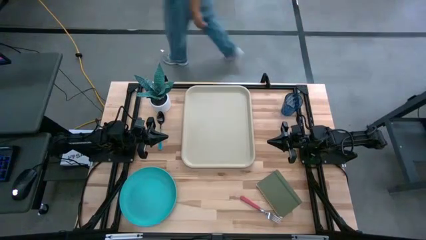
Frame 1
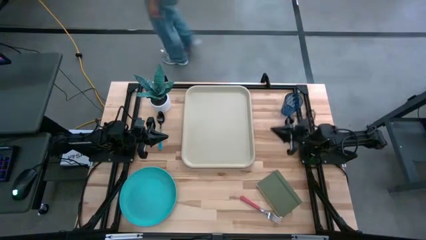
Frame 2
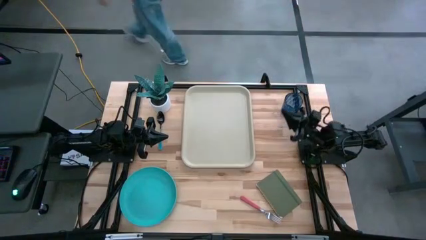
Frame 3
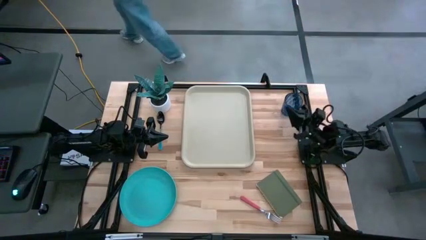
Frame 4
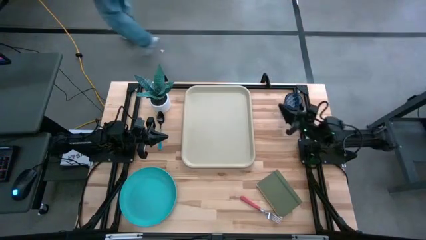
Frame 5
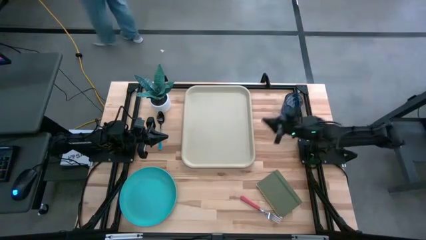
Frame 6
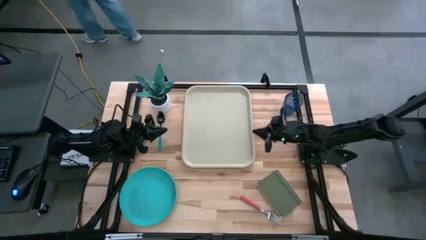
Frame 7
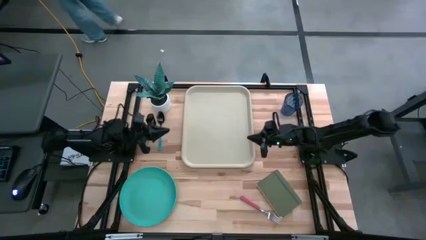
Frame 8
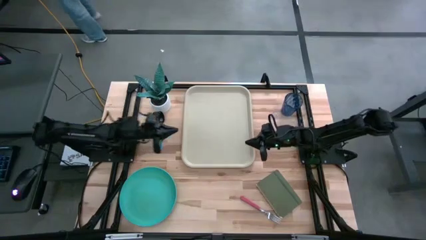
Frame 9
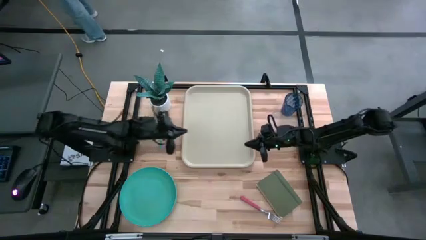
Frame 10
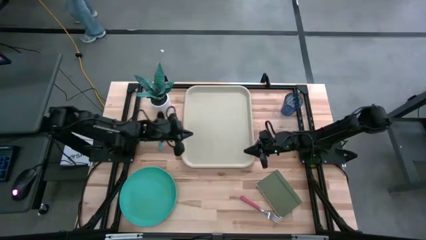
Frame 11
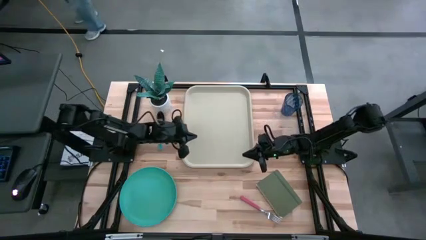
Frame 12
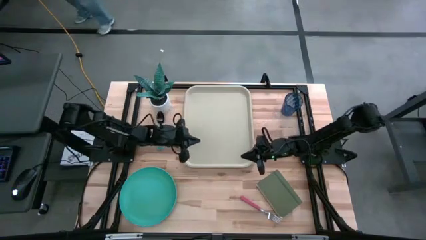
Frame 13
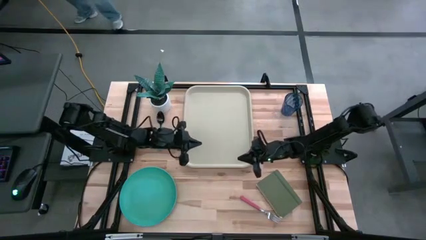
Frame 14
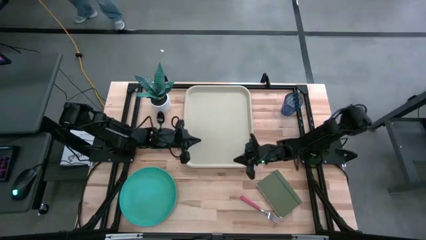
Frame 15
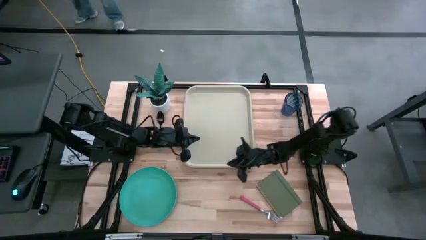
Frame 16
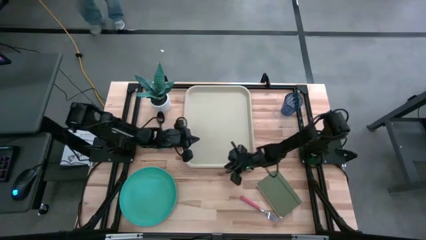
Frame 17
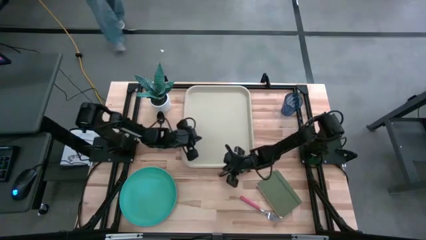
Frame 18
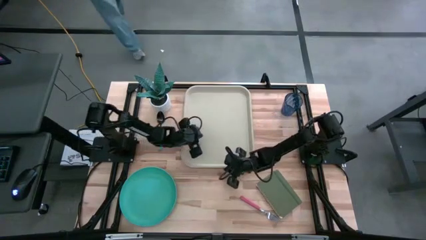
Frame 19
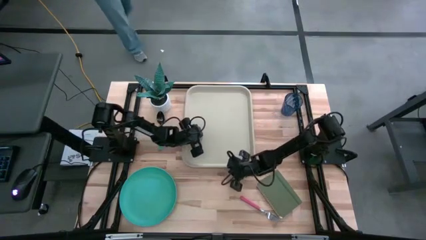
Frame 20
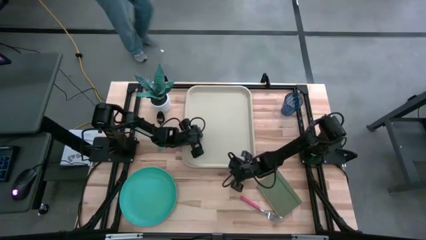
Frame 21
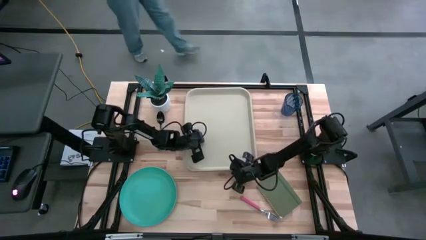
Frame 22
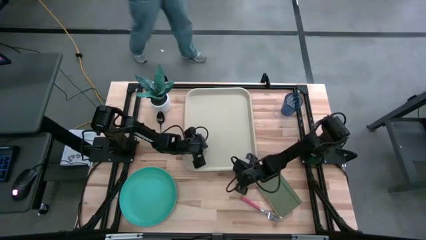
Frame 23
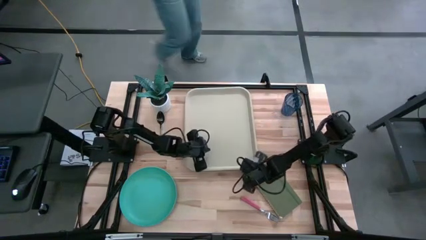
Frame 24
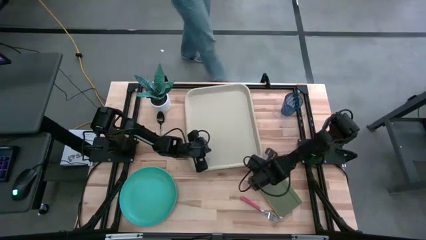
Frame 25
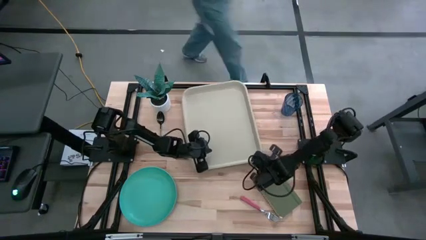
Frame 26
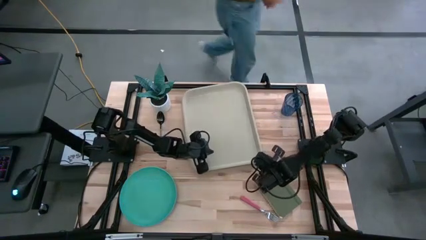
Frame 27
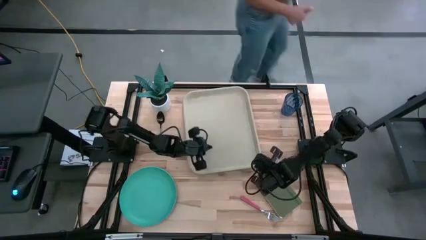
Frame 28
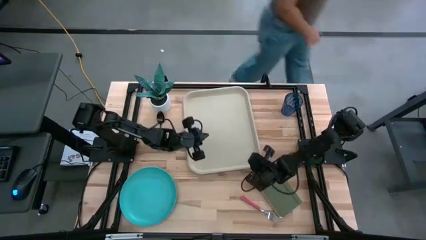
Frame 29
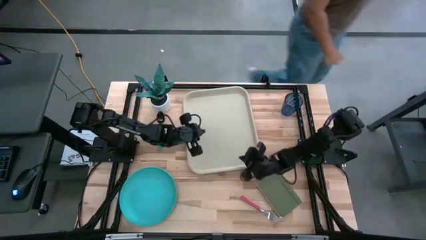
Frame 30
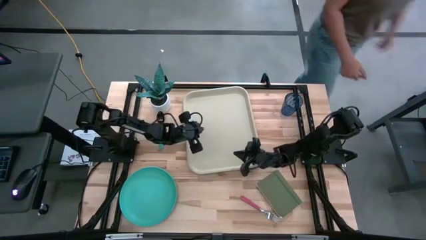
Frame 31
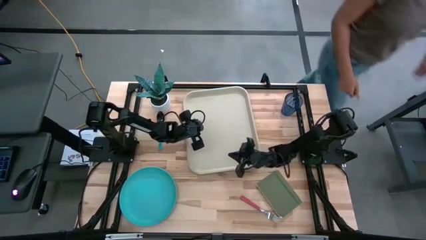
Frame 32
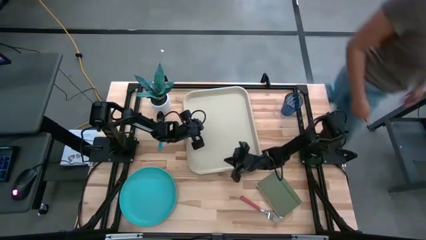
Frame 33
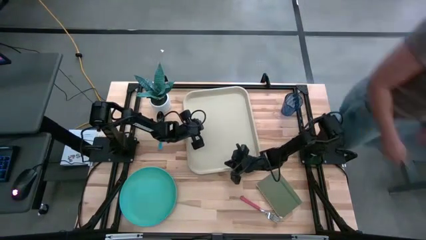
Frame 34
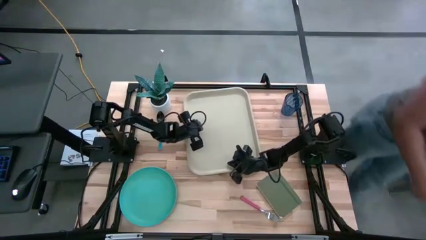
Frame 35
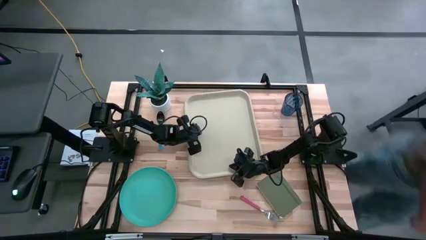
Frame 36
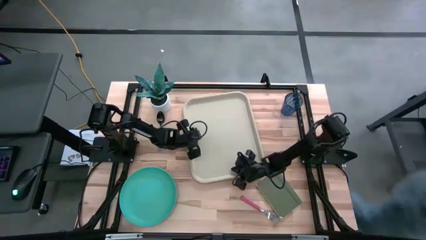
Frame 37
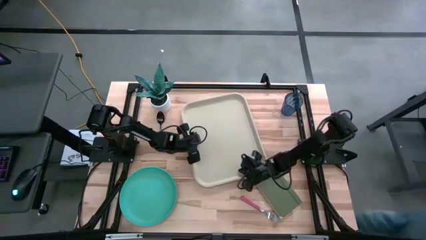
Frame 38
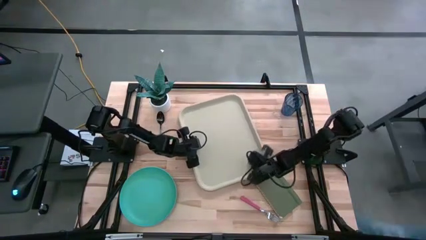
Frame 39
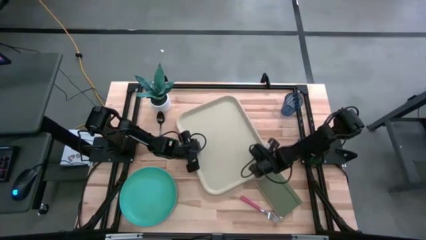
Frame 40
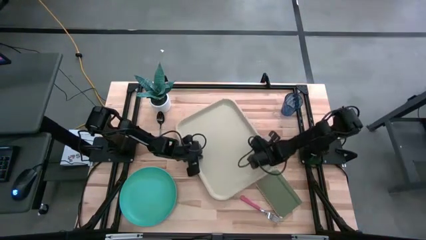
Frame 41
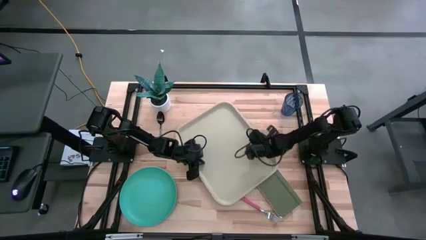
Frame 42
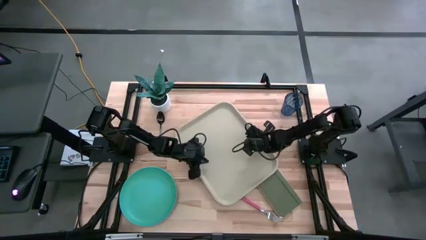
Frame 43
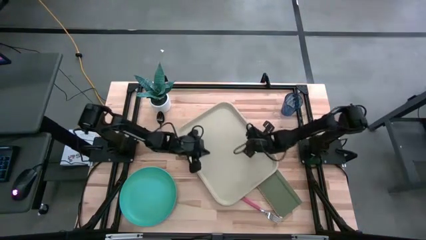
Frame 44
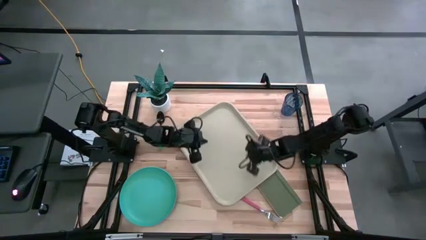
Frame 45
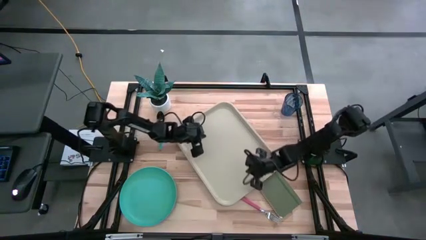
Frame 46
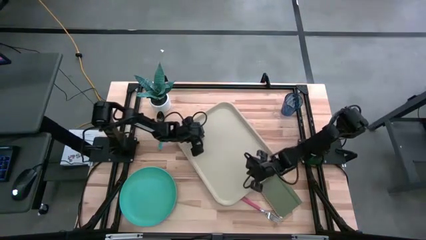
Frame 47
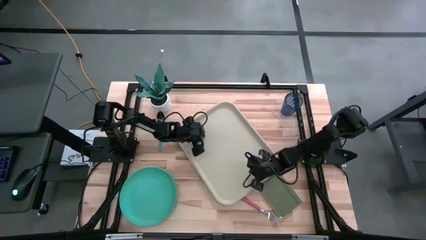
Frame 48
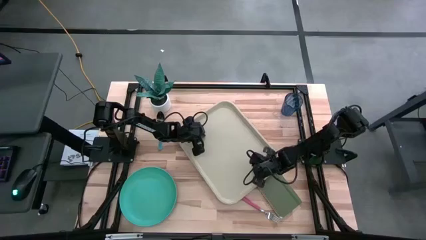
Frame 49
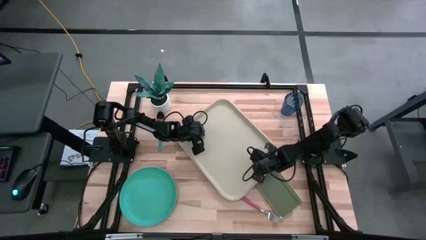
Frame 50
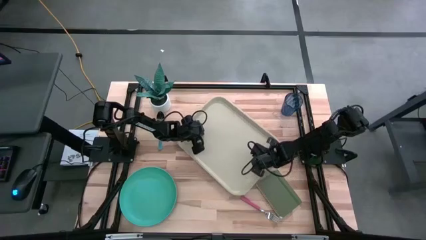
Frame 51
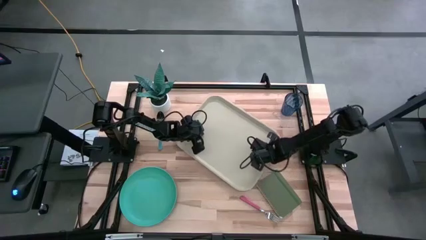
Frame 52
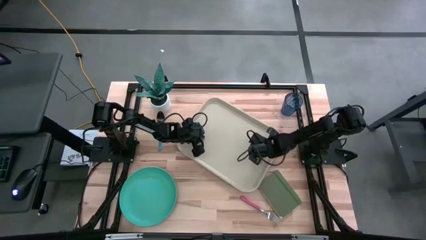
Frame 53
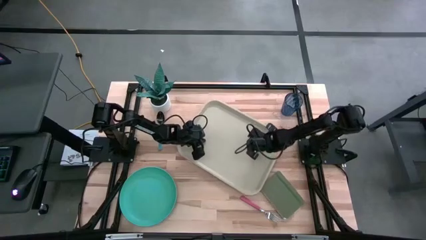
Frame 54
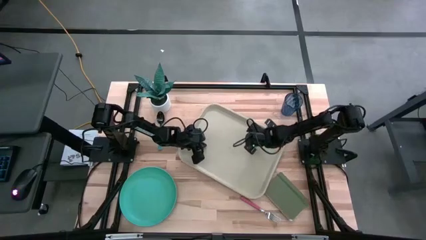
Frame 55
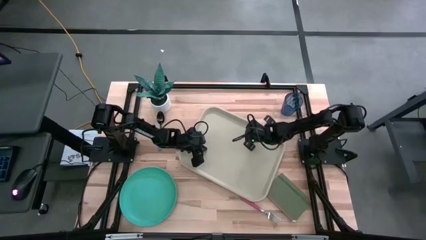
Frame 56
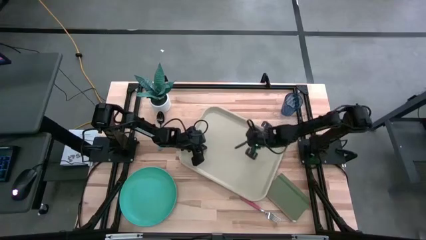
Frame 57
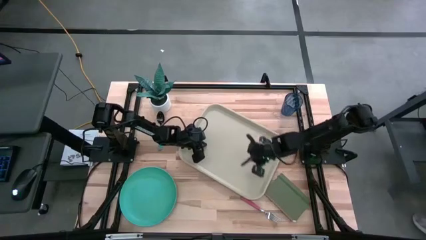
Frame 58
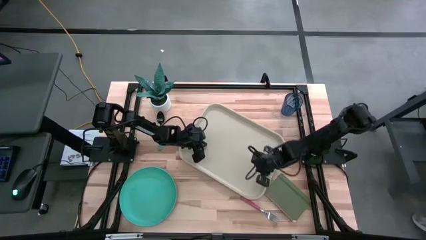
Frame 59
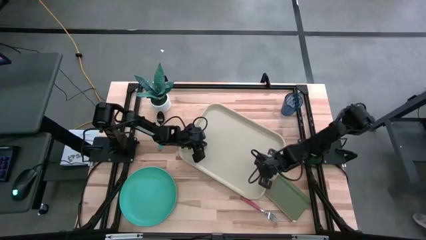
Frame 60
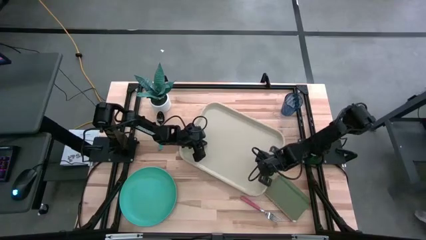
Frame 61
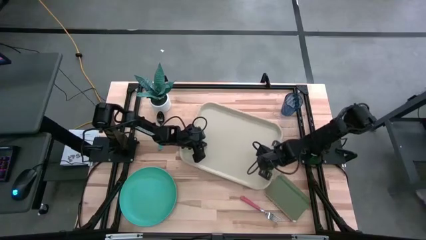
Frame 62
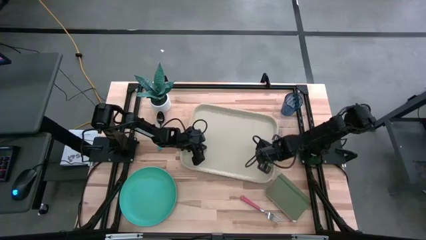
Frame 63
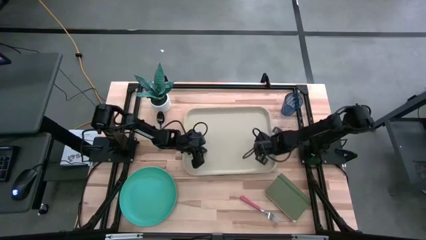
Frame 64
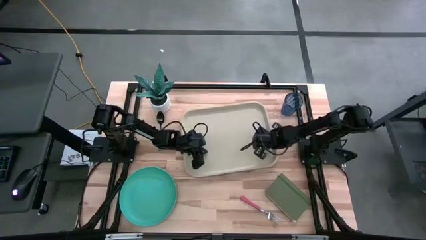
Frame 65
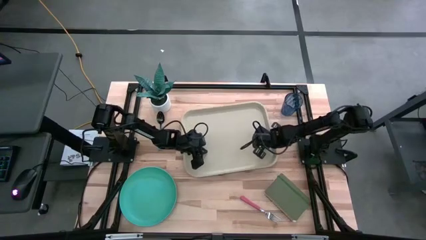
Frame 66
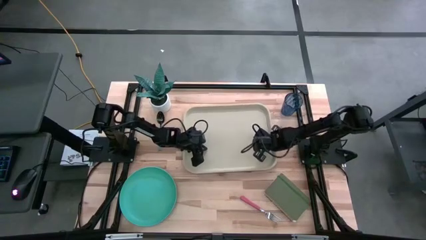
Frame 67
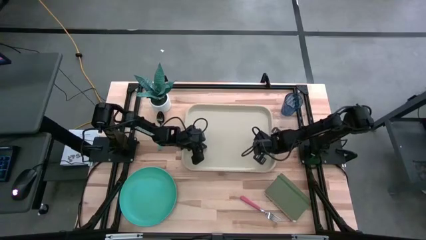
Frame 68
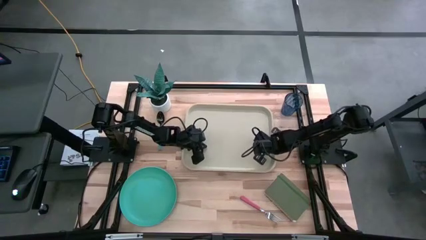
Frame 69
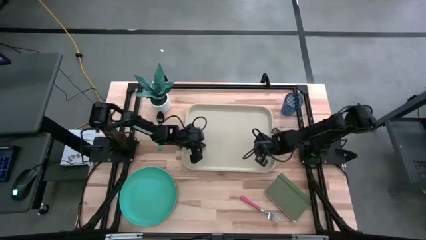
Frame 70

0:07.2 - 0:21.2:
Task: Pick and place plate/cup/fork/spoon on tray
Adjust the light brown serving tray
